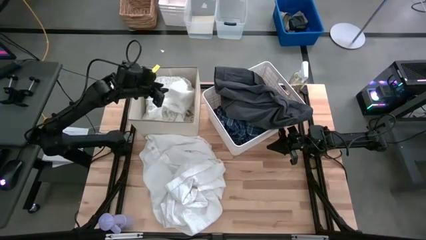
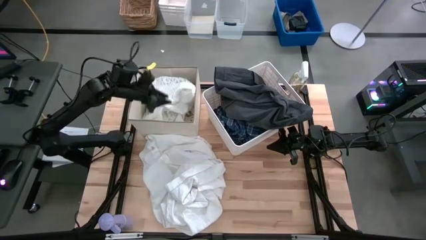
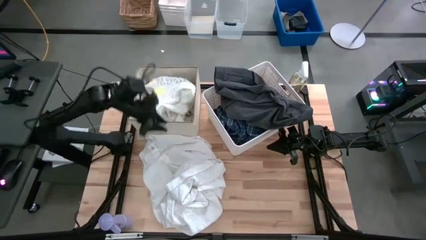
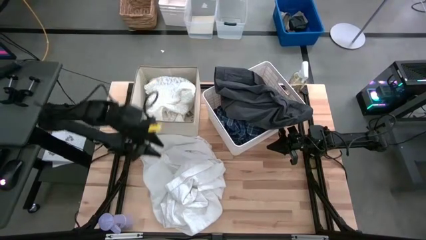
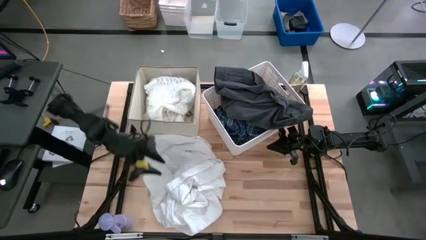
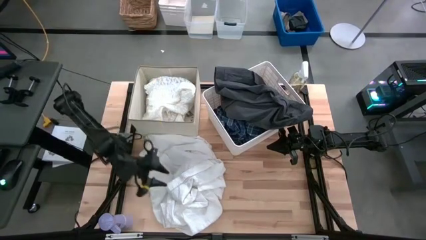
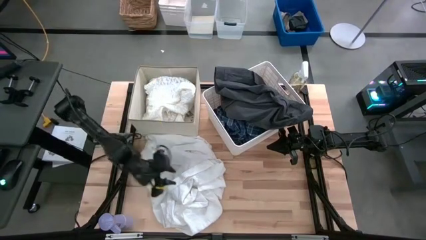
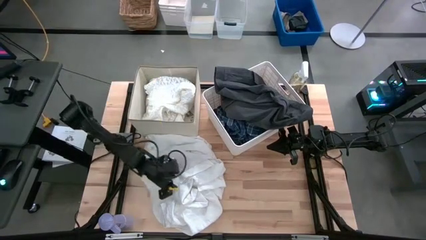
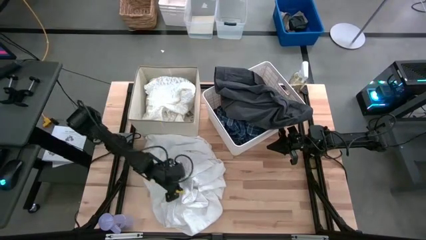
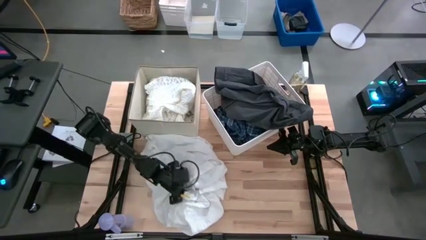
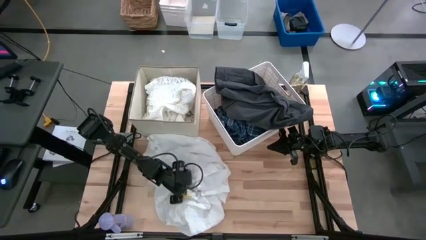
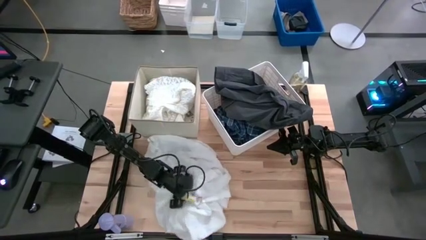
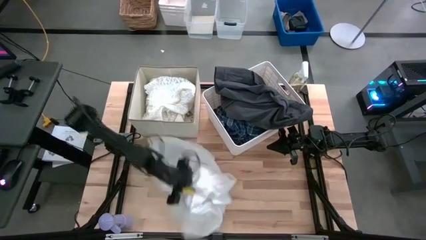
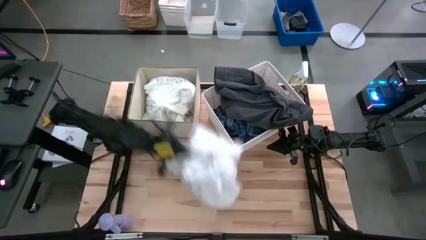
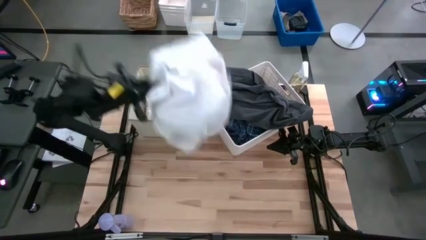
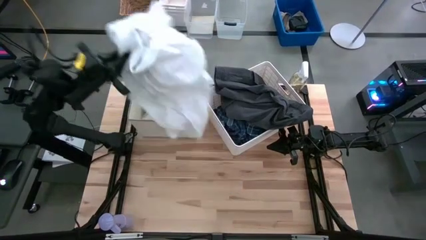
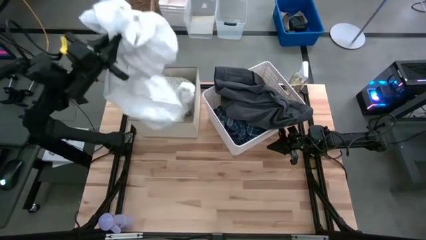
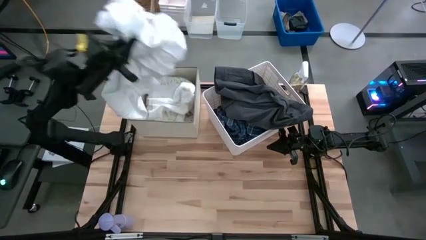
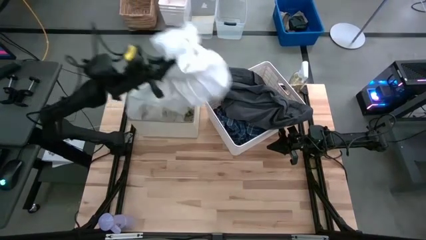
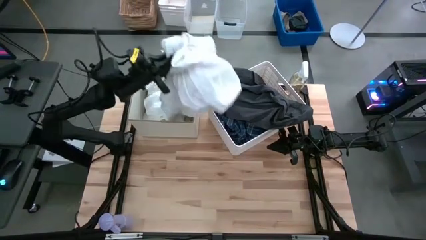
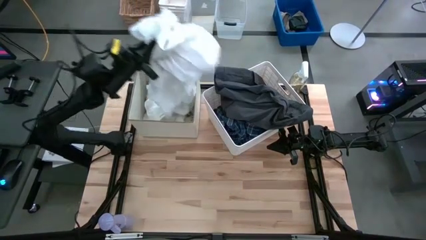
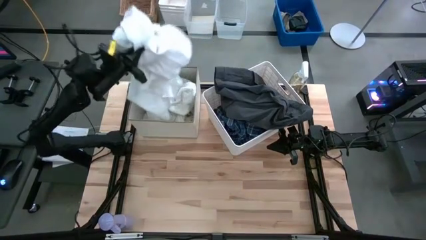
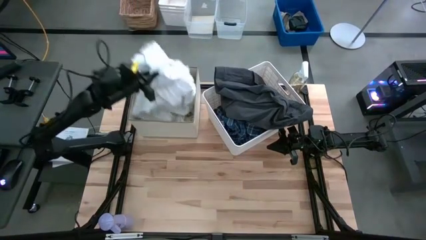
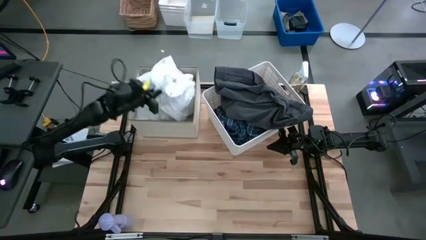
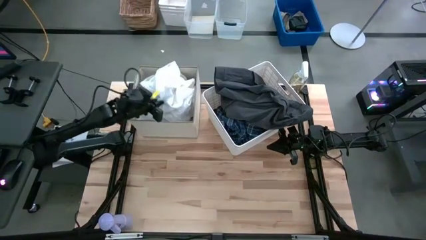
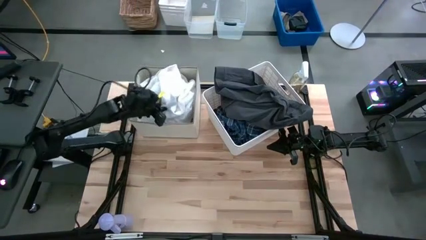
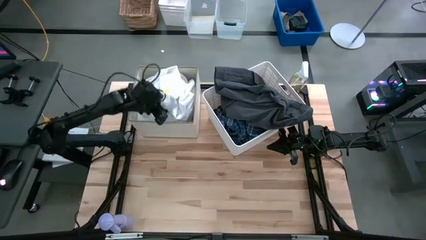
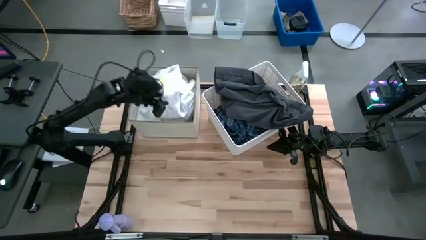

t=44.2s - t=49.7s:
Task: Sort clothes
Put the white shirt into the gray laundry organizer

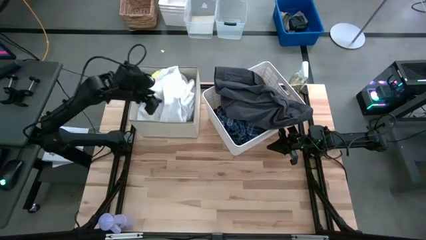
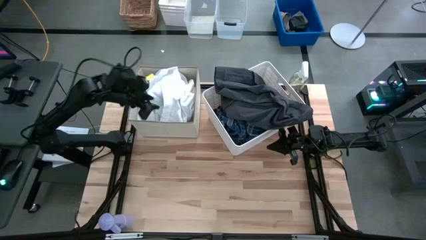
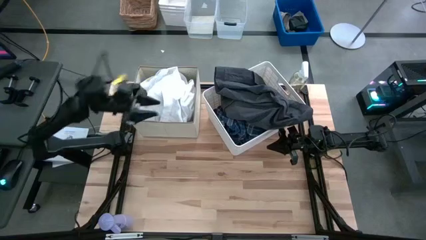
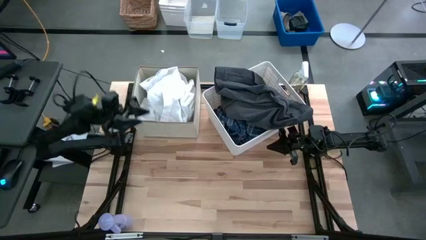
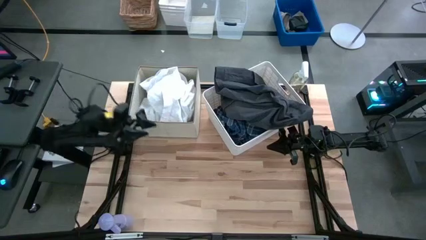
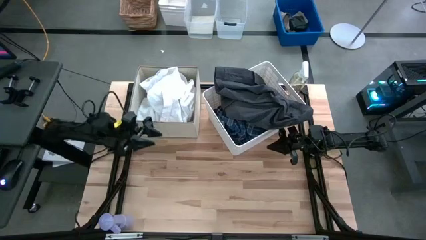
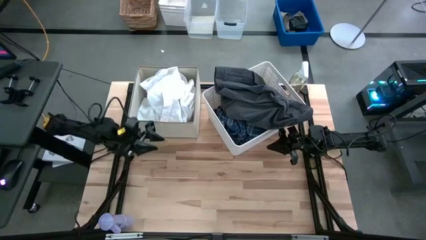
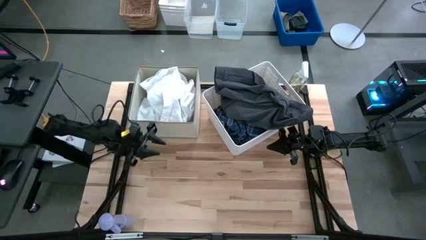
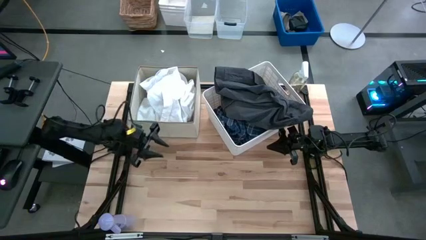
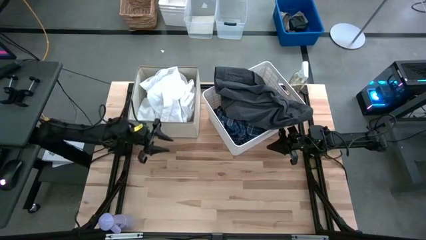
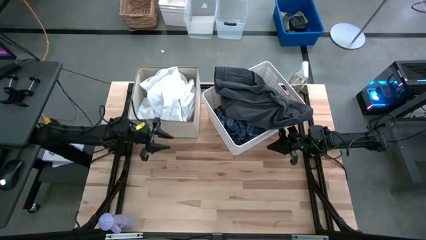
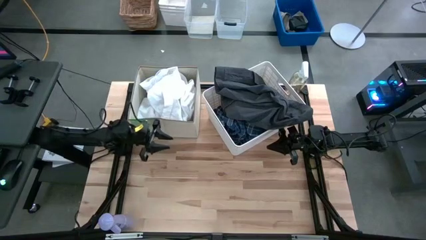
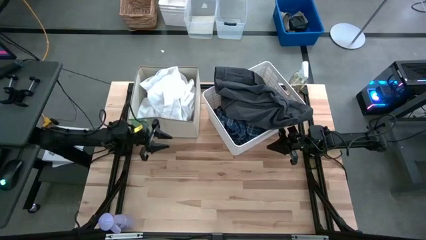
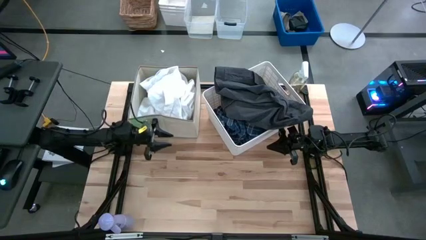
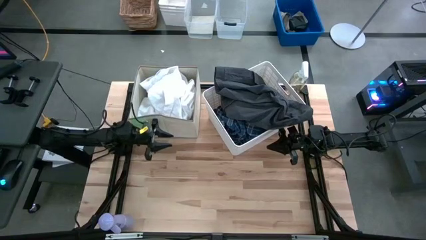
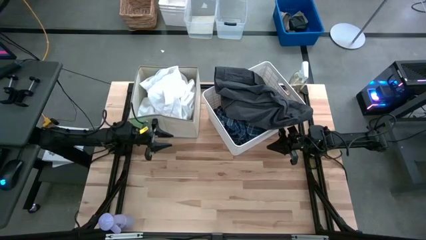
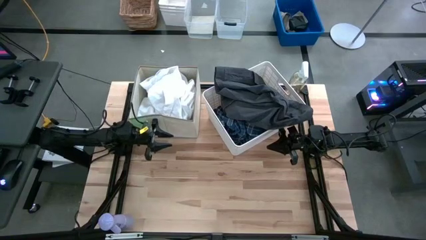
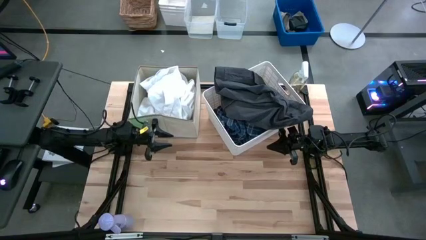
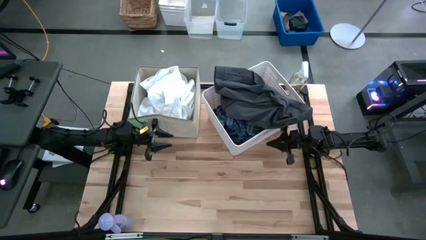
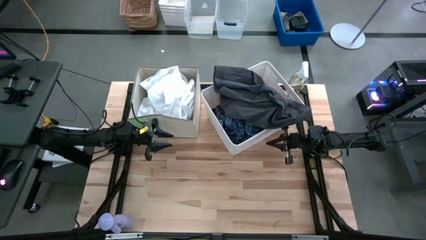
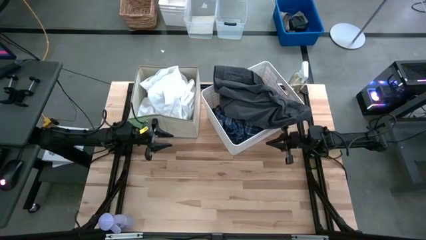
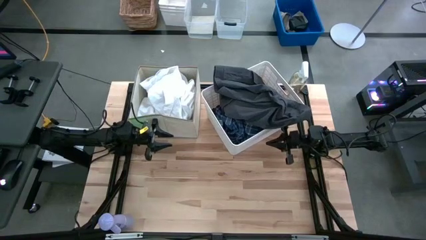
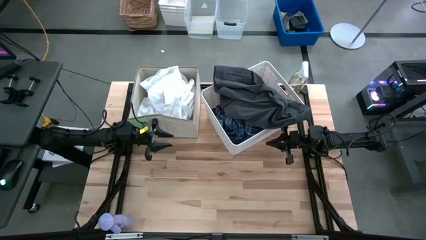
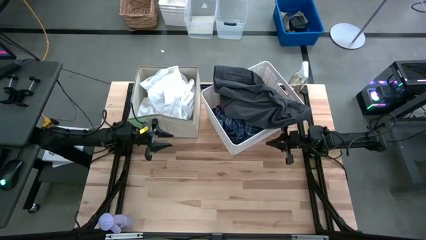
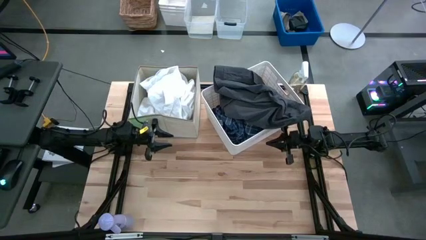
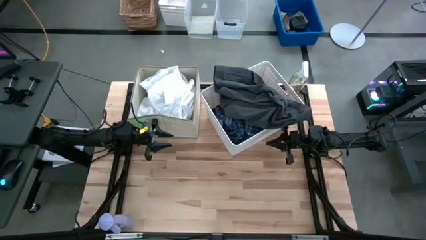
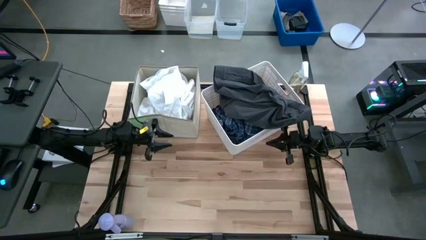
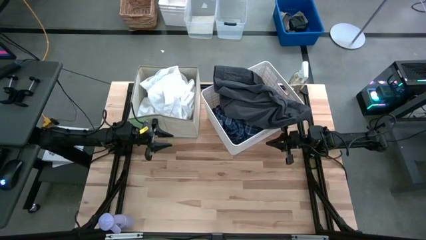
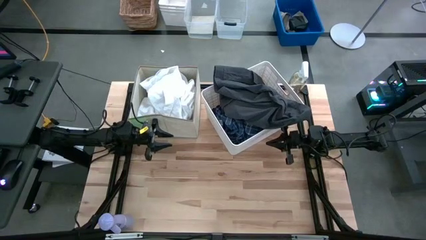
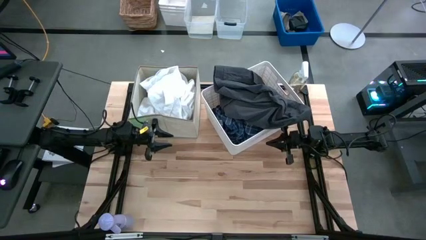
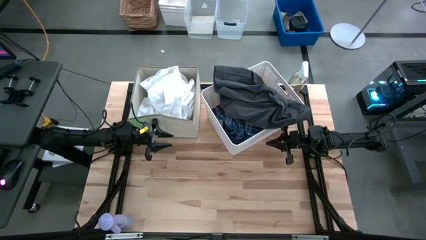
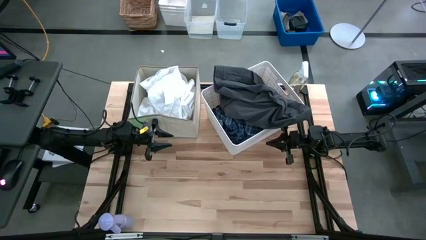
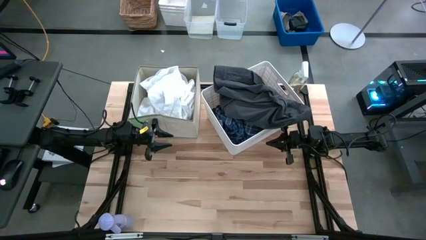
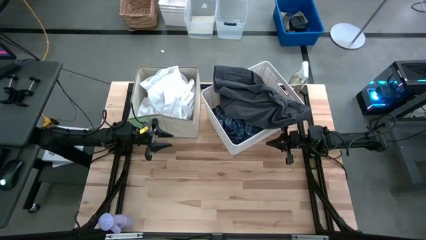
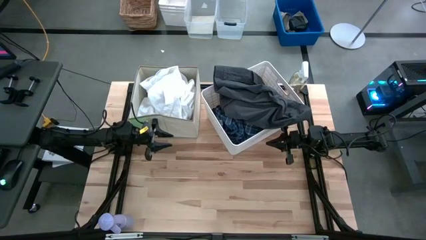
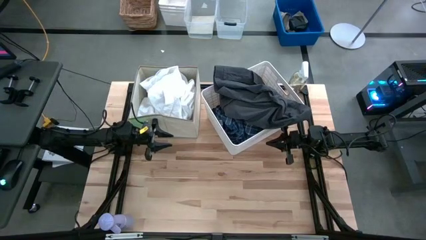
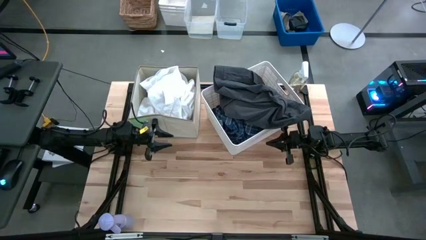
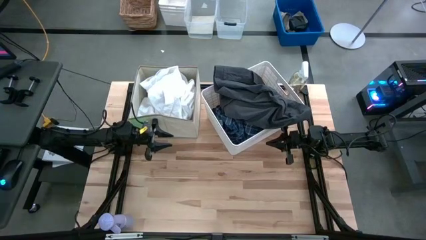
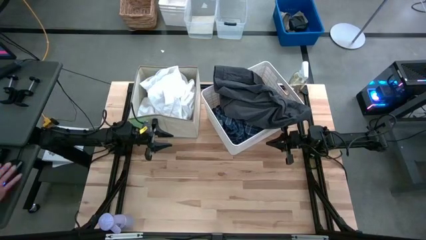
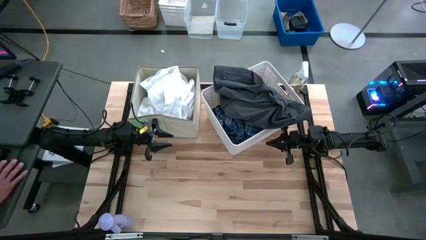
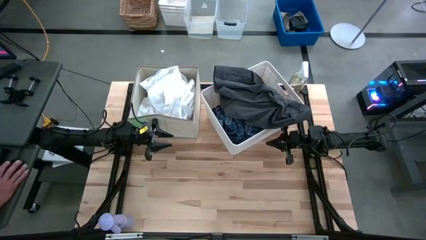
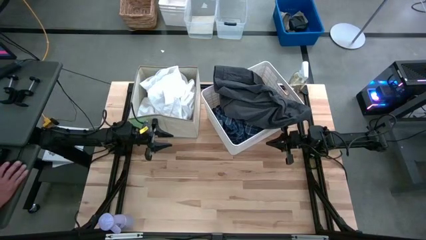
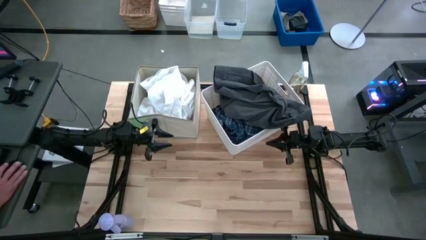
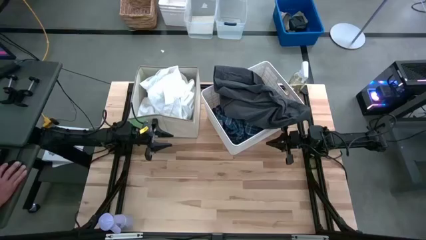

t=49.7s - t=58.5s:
Return to Home Position
